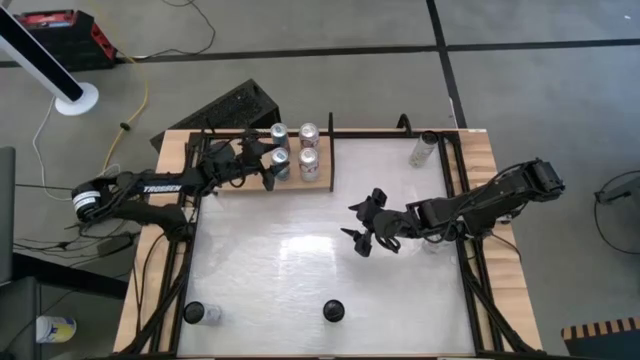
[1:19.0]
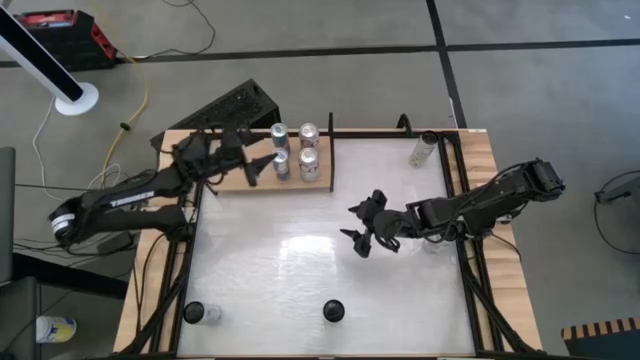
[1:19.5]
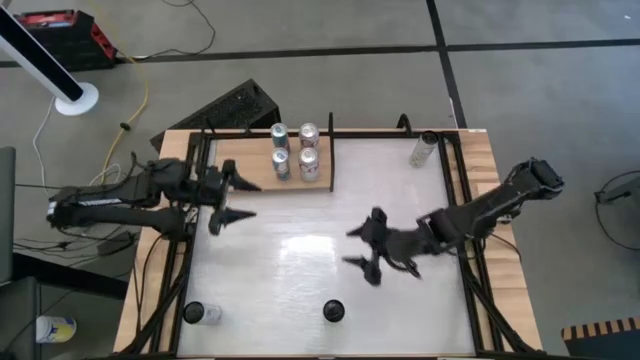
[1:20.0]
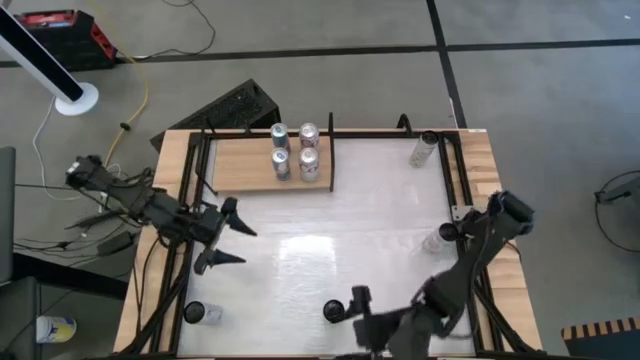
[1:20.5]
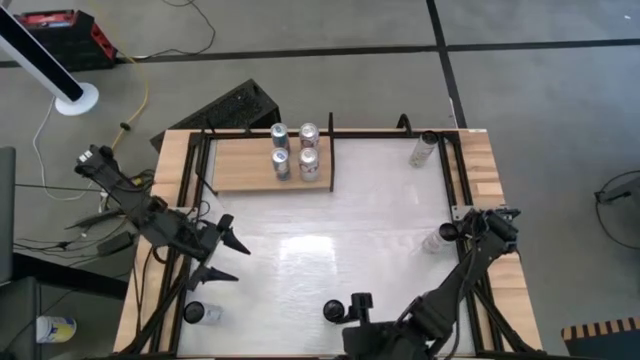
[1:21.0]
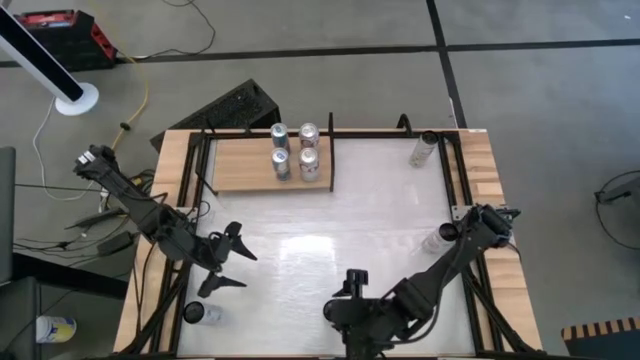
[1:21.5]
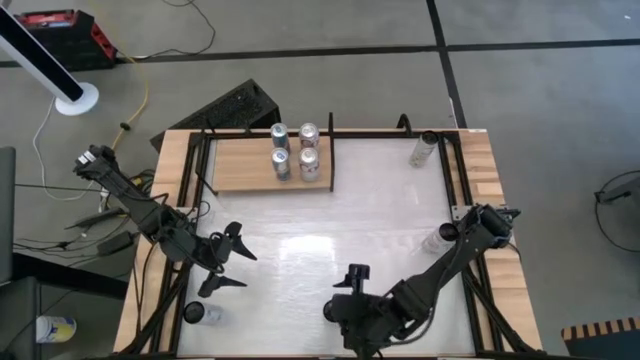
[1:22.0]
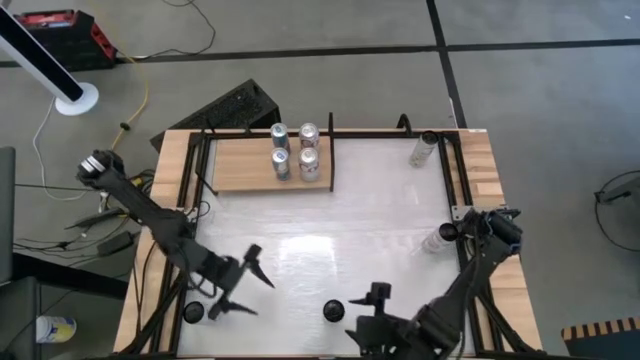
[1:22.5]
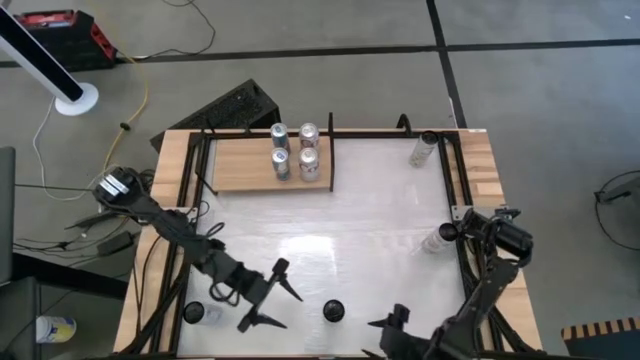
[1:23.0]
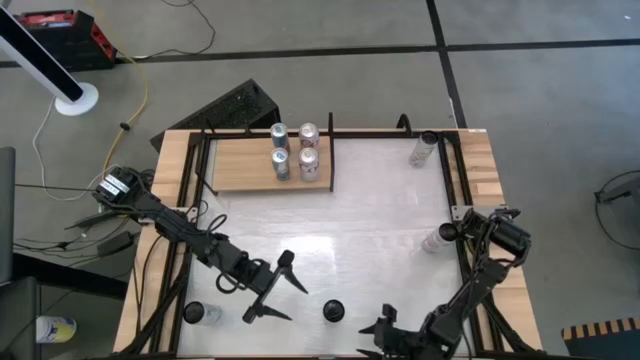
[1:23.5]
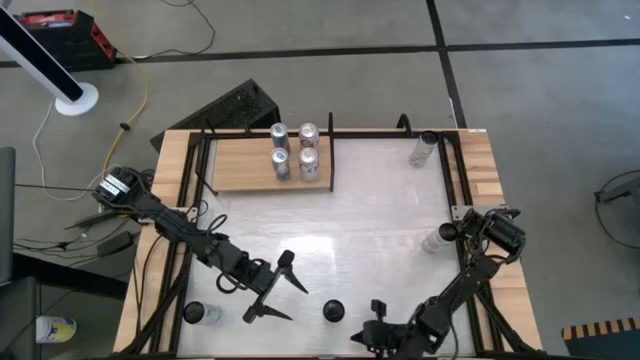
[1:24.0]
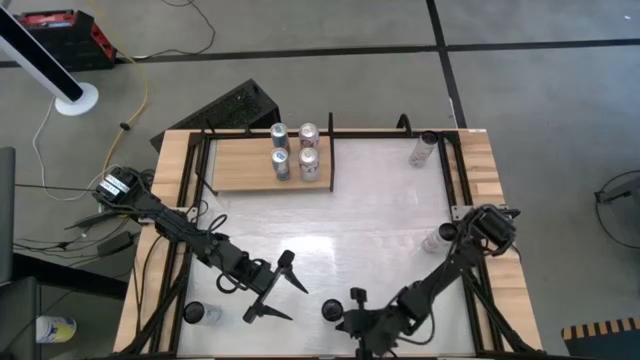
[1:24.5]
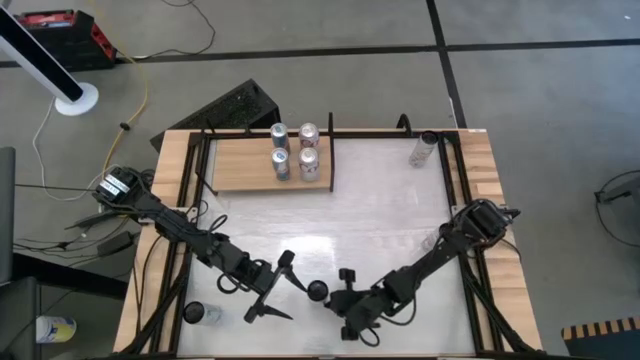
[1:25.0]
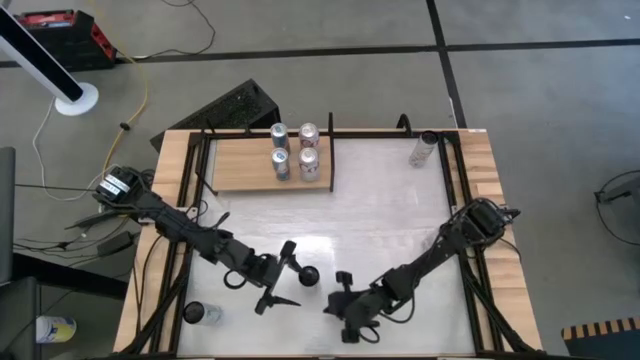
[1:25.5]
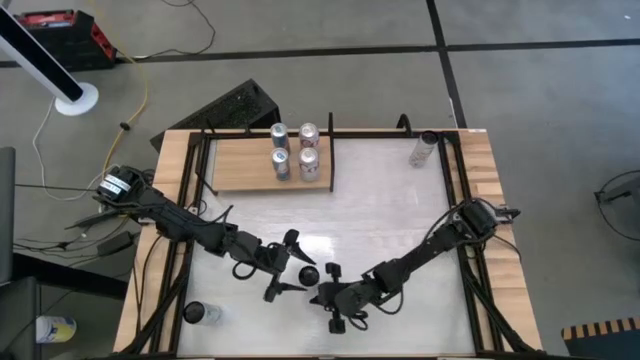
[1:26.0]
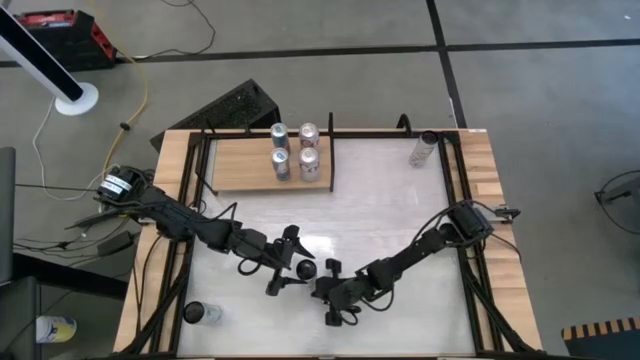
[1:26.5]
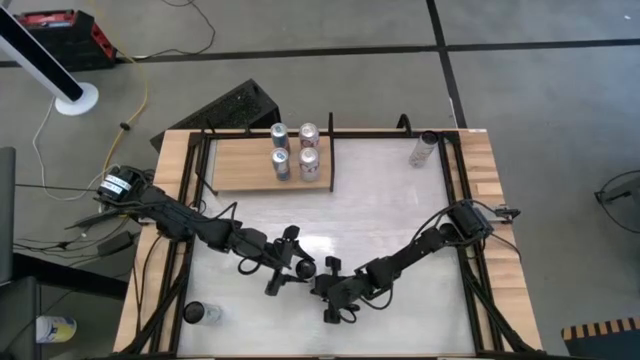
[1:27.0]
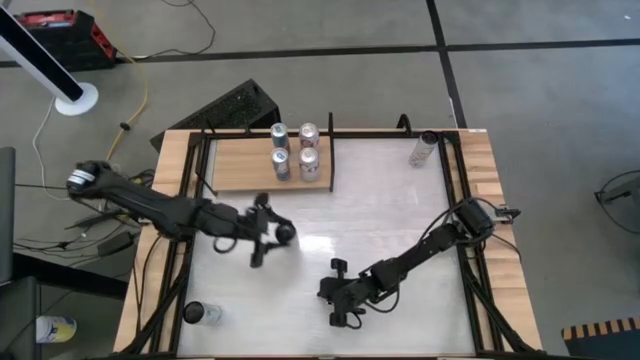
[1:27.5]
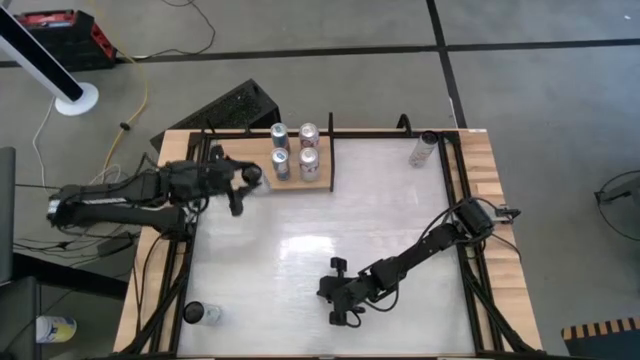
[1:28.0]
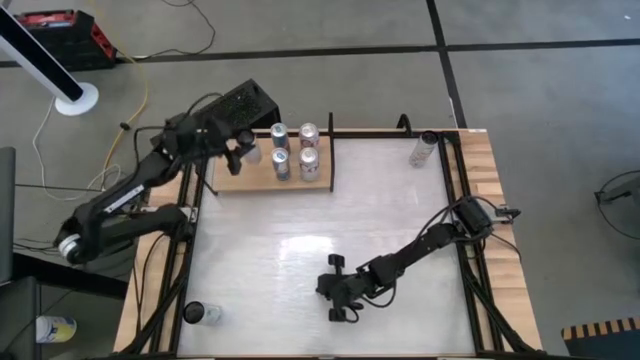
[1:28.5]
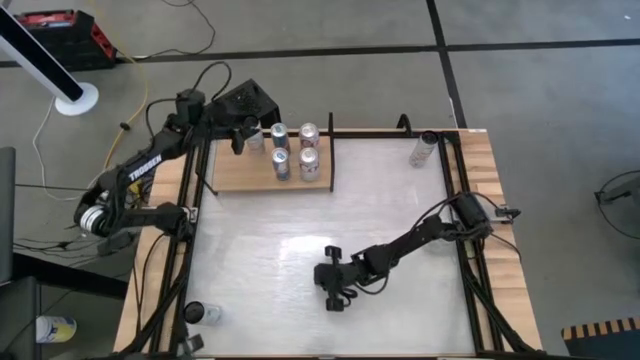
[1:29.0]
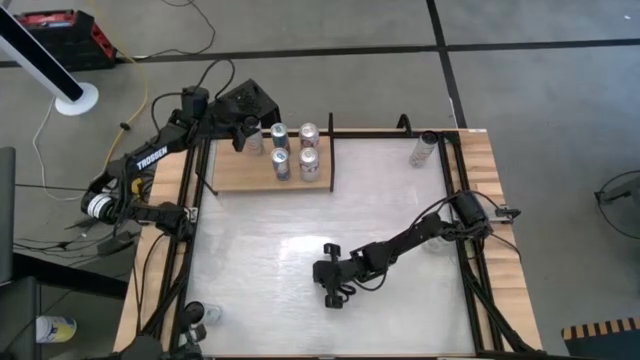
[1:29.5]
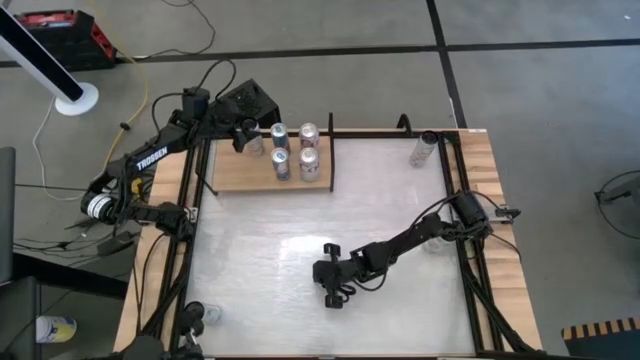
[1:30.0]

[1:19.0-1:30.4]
Task: Place canned beverage on shelf
Put the bottom orange soda can on the shelf

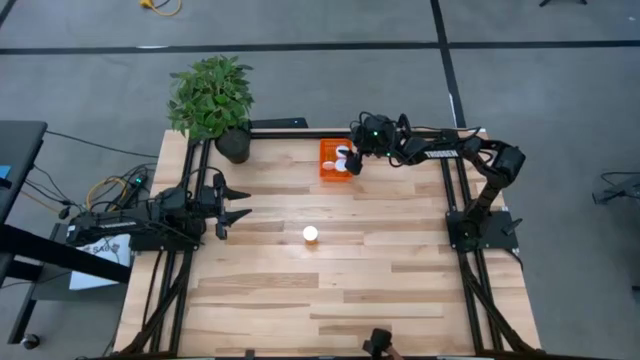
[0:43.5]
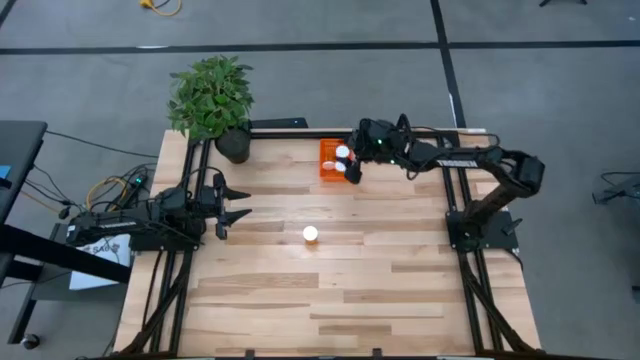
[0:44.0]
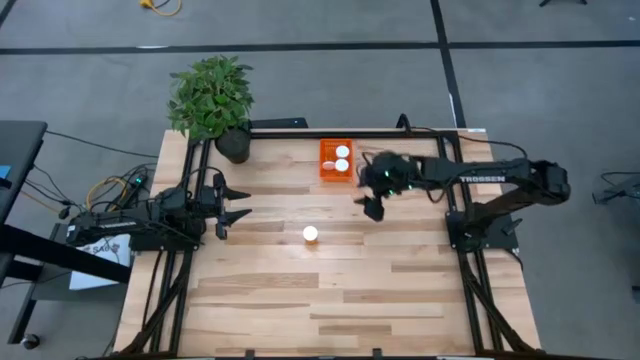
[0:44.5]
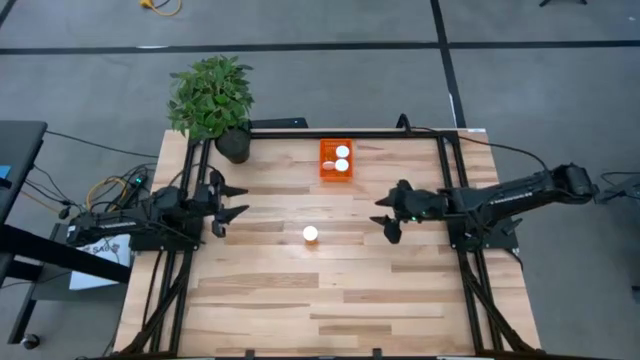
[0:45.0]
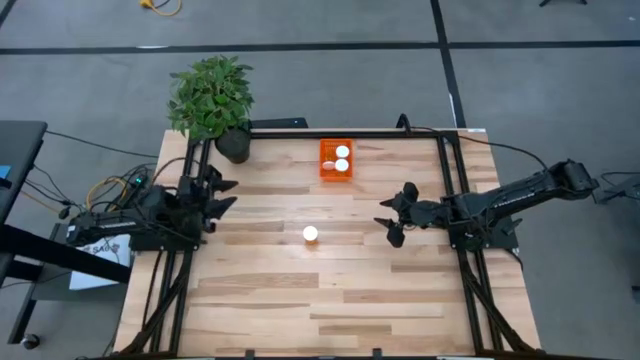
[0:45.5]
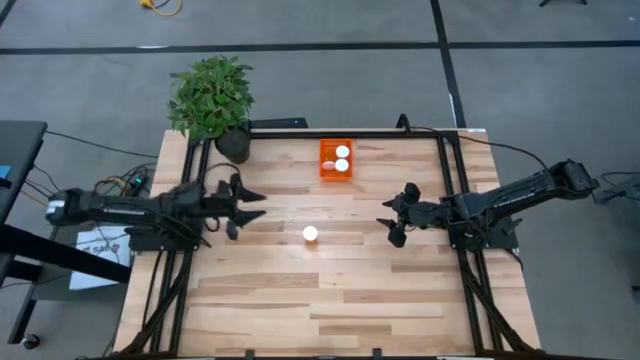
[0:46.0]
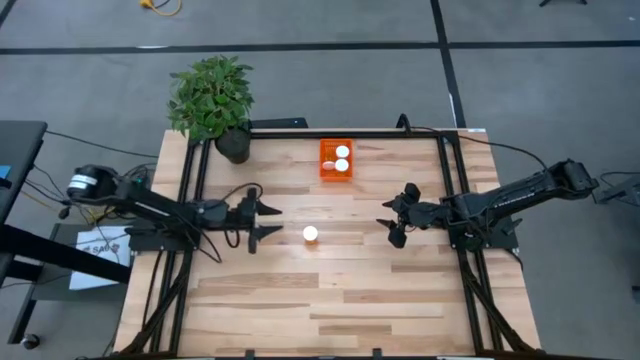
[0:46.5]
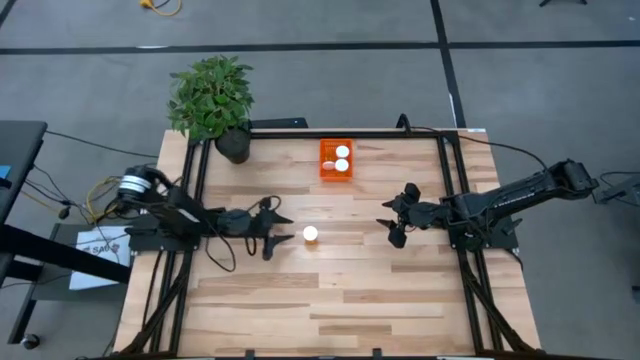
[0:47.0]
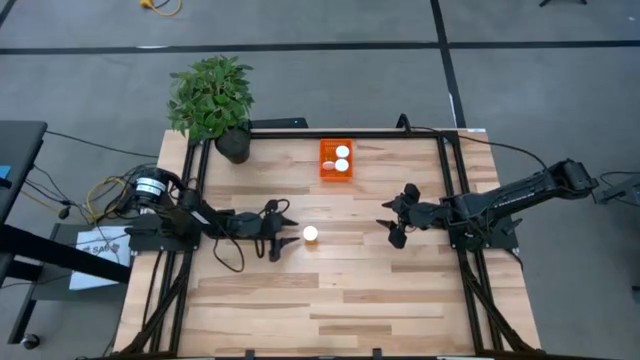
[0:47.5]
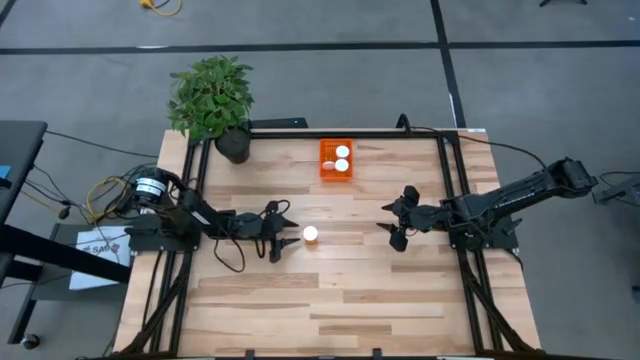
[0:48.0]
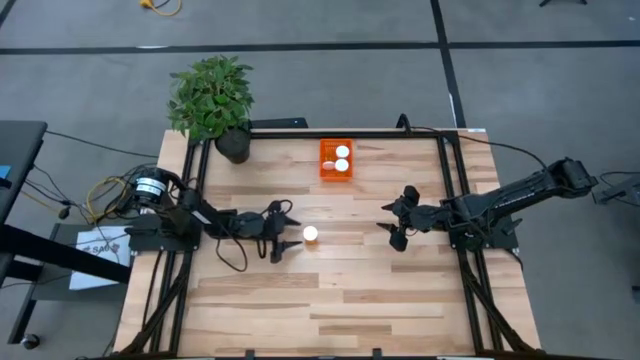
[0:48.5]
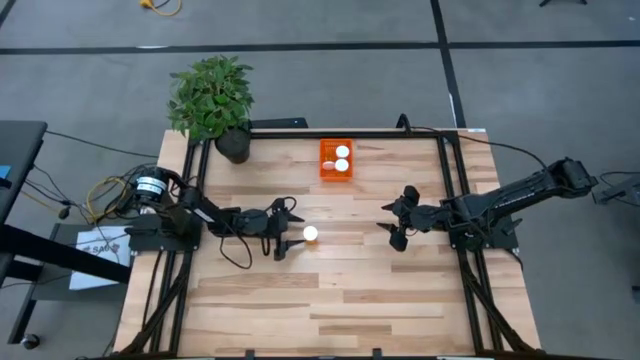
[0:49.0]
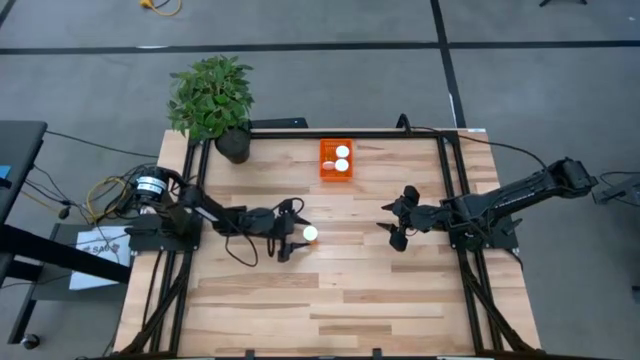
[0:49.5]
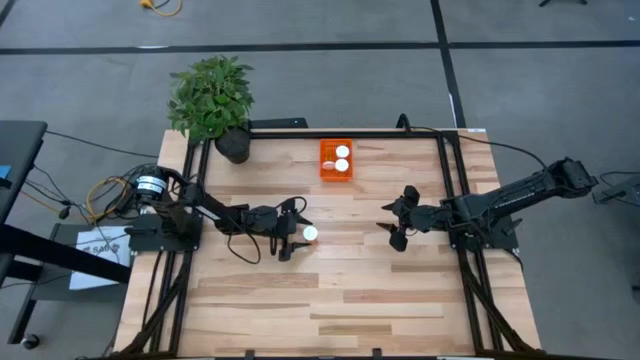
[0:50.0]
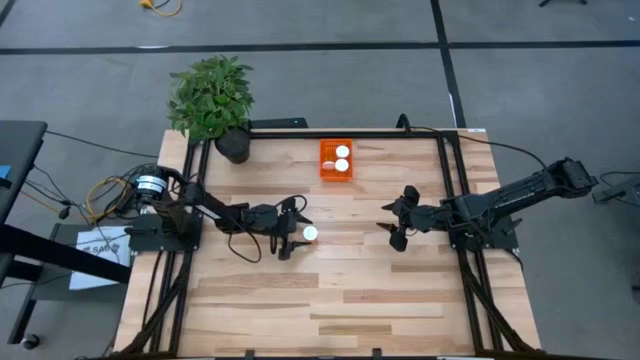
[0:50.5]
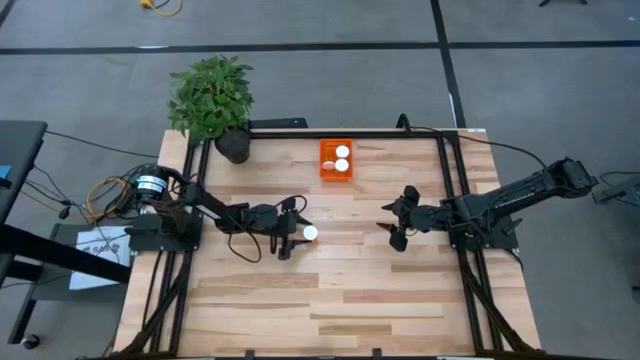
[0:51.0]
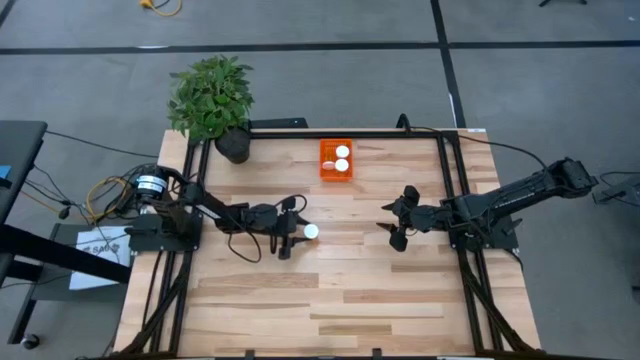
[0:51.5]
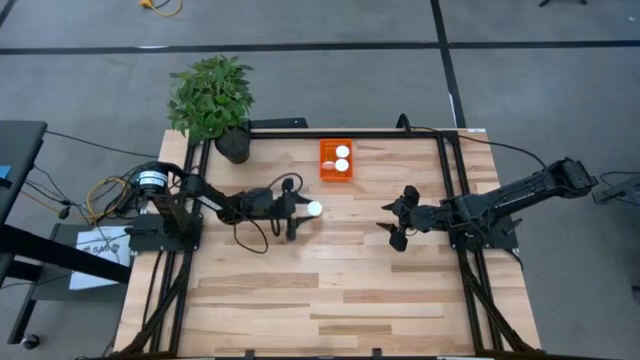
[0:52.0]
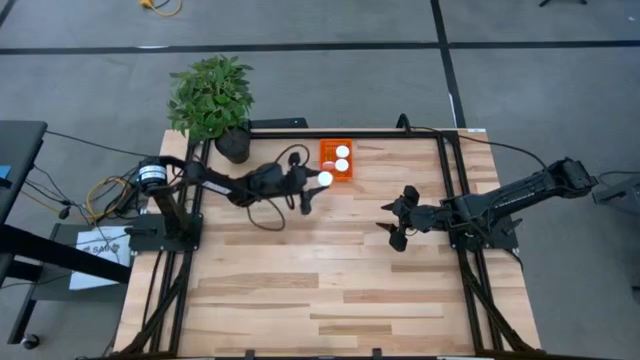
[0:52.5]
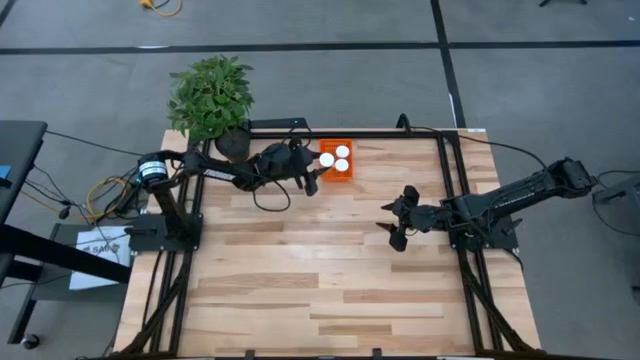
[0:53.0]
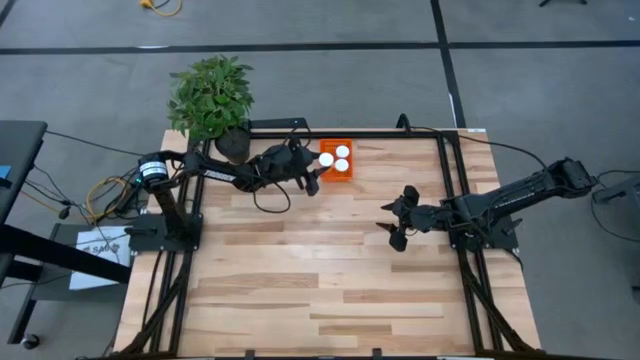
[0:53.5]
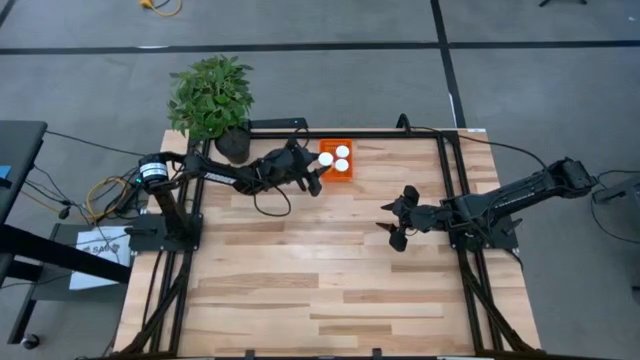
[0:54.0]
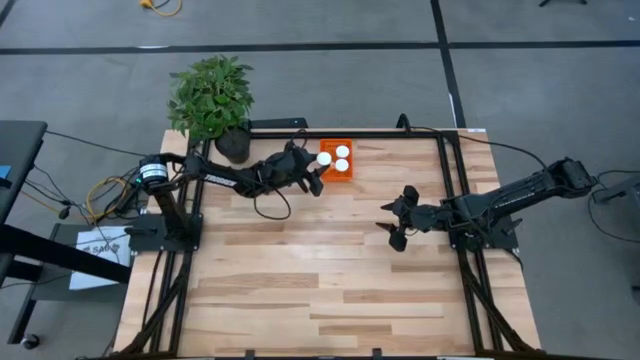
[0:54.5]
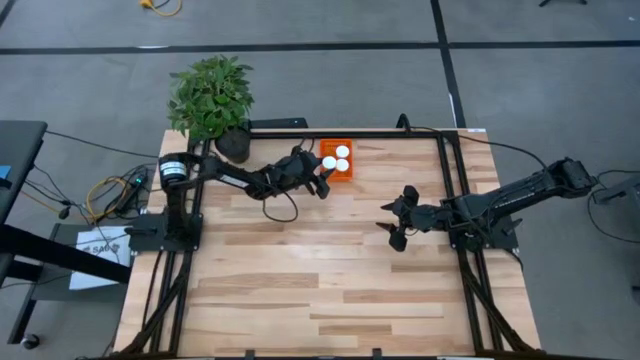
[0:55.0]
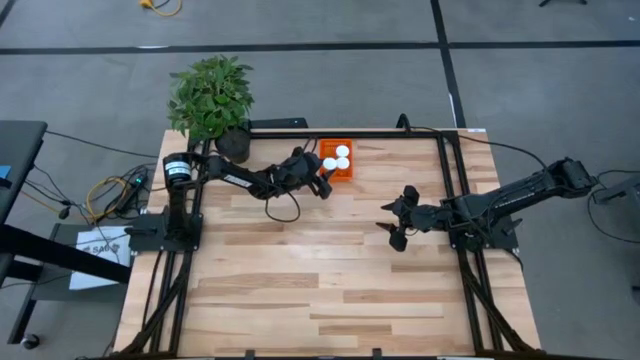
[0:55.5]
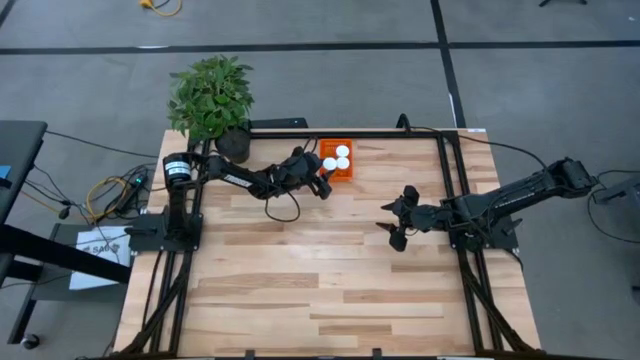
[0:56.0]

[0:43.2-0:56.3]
Task: Pick and place pill bottles into a basket
Put the orange pill bottle into the orange basket
